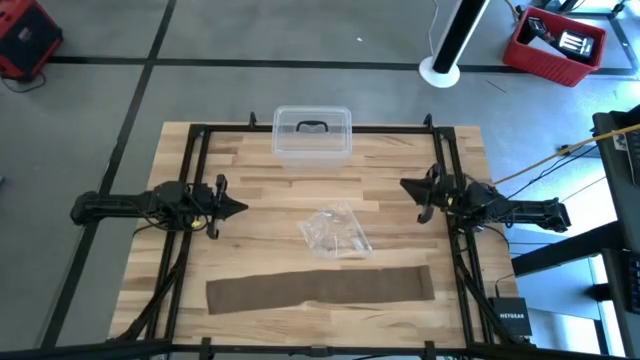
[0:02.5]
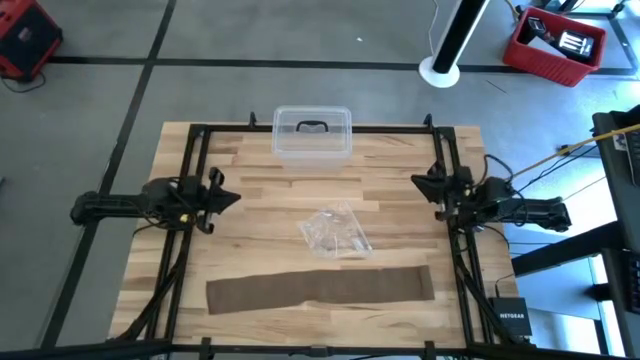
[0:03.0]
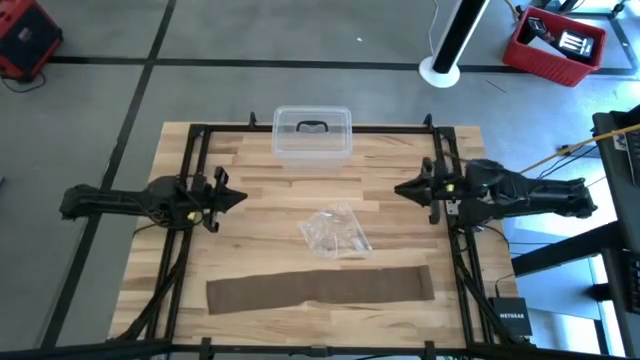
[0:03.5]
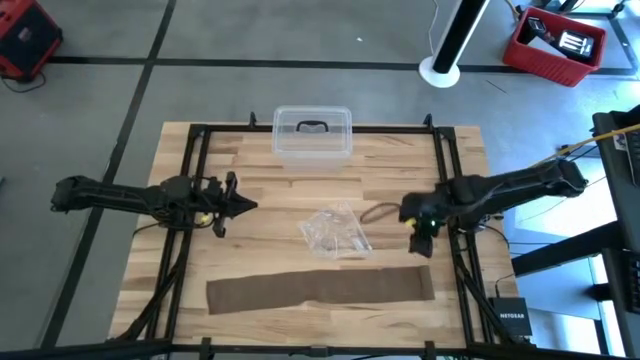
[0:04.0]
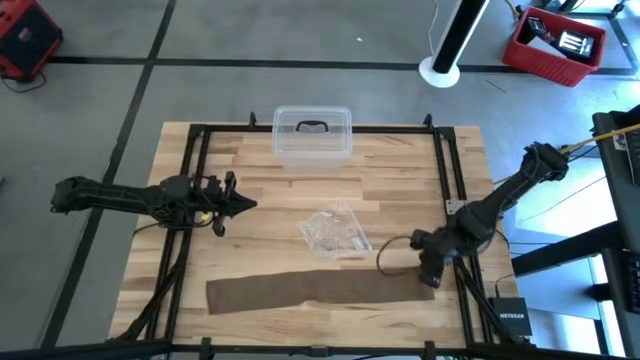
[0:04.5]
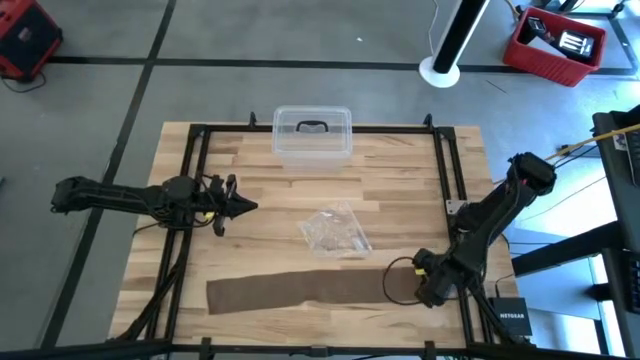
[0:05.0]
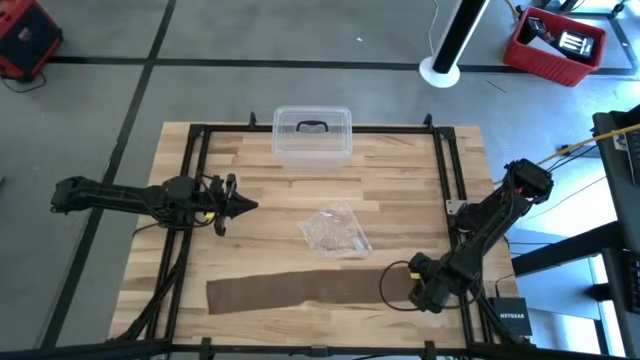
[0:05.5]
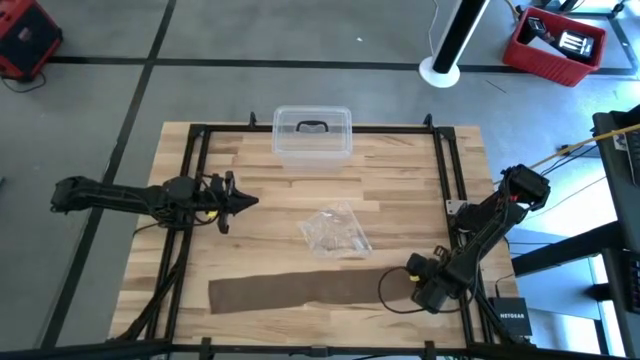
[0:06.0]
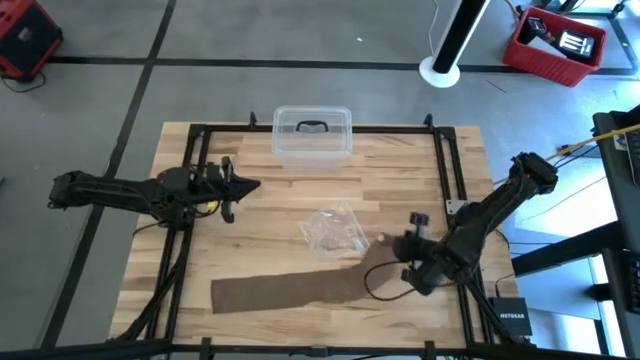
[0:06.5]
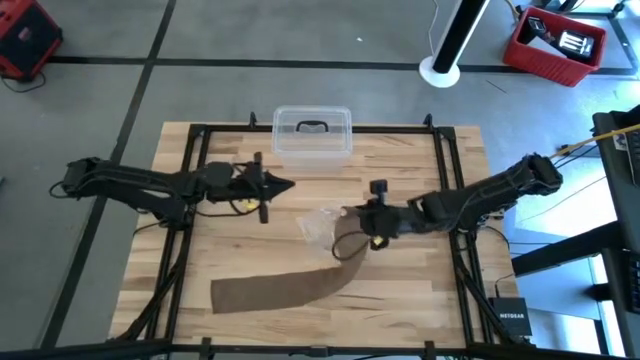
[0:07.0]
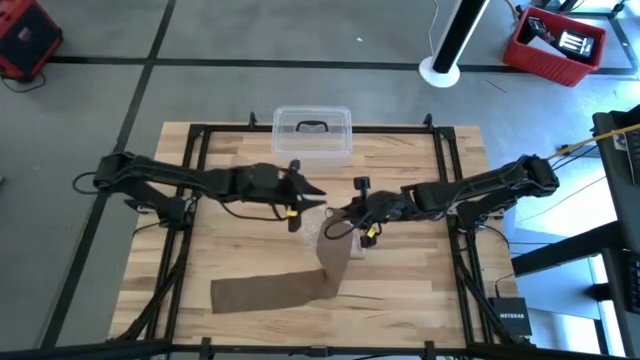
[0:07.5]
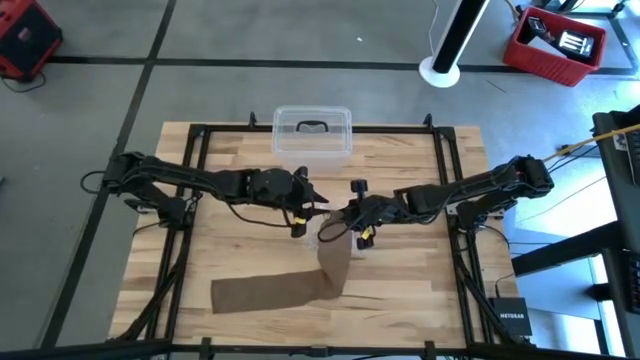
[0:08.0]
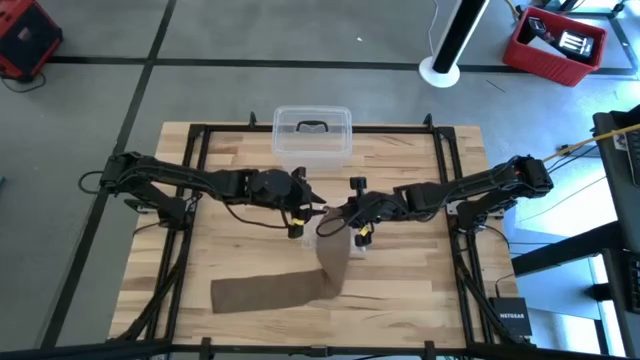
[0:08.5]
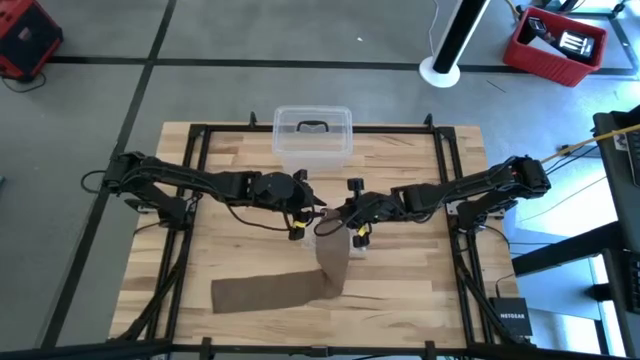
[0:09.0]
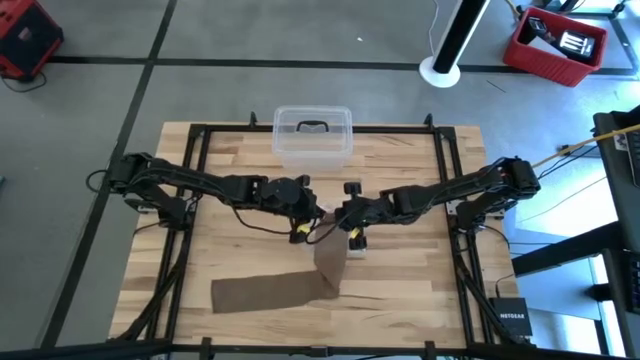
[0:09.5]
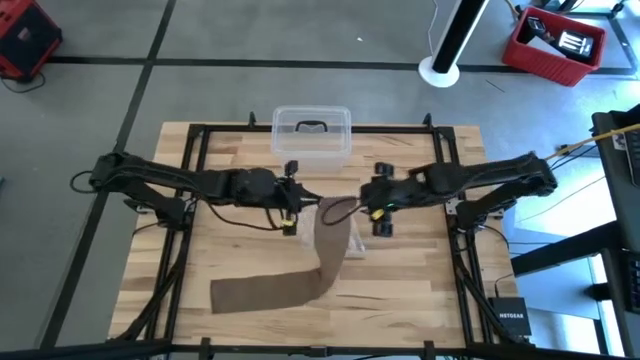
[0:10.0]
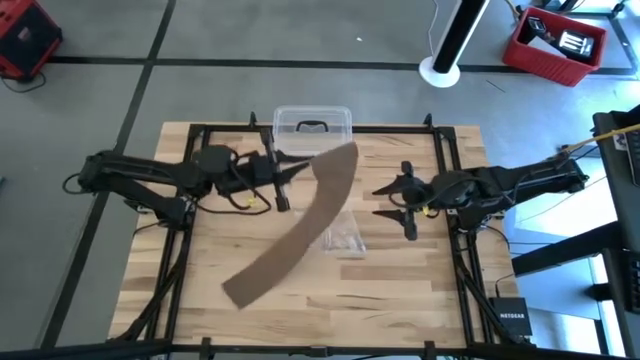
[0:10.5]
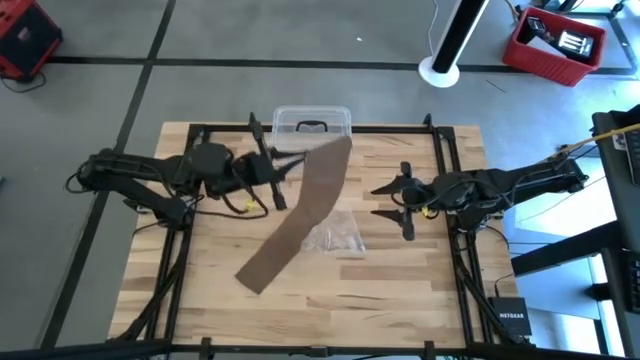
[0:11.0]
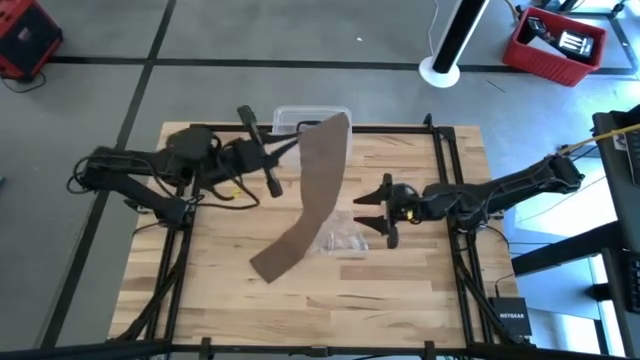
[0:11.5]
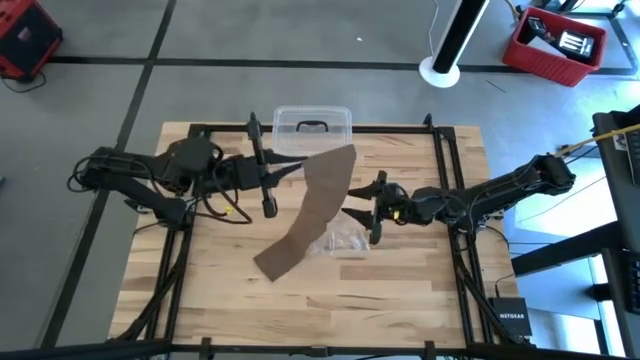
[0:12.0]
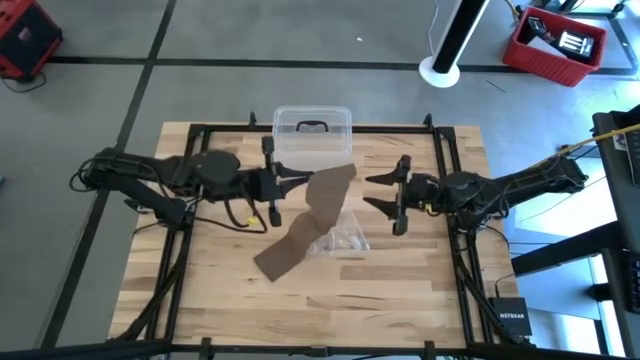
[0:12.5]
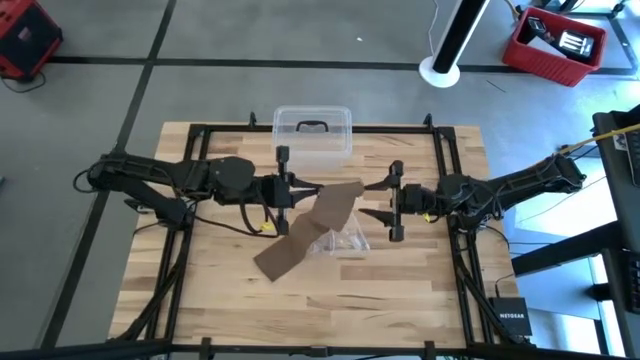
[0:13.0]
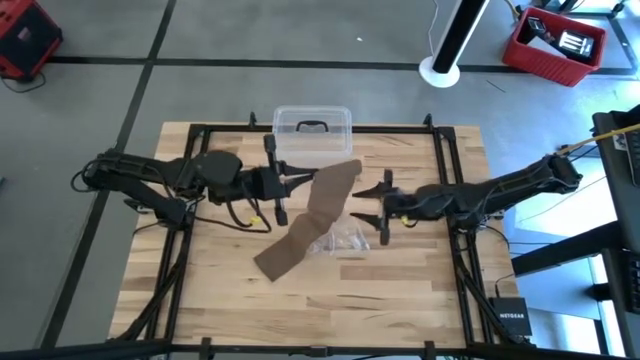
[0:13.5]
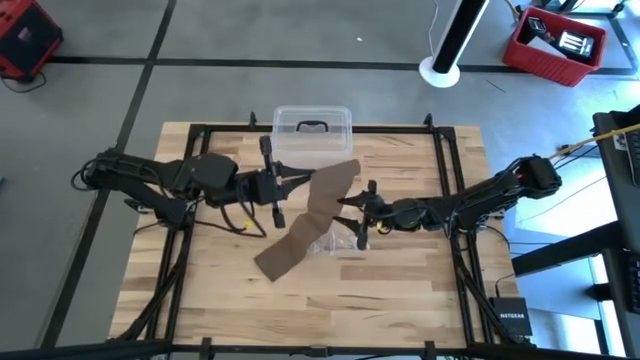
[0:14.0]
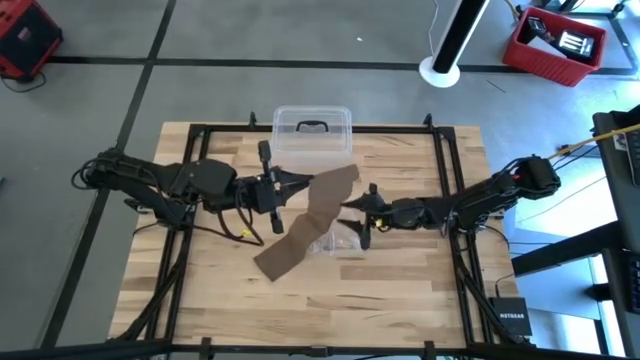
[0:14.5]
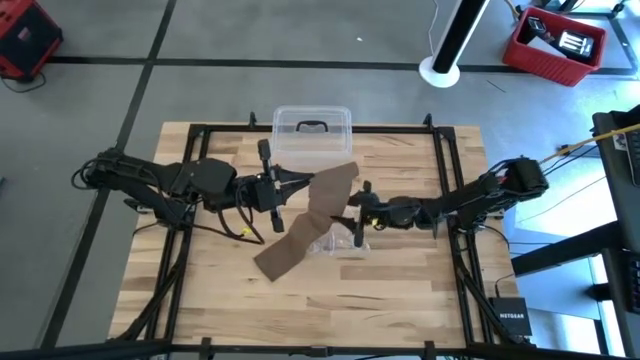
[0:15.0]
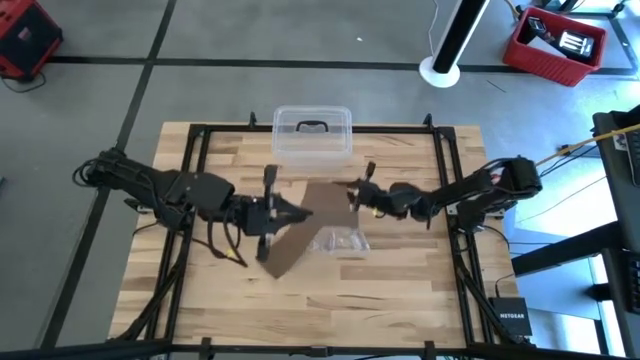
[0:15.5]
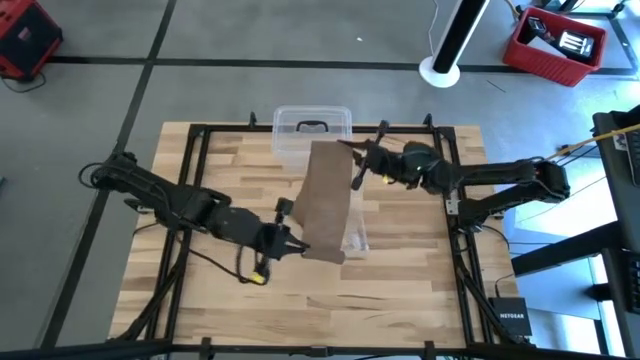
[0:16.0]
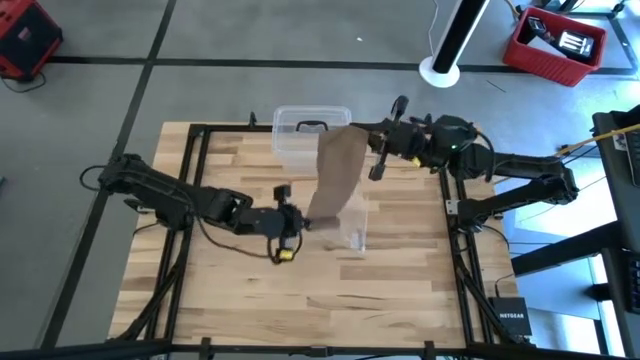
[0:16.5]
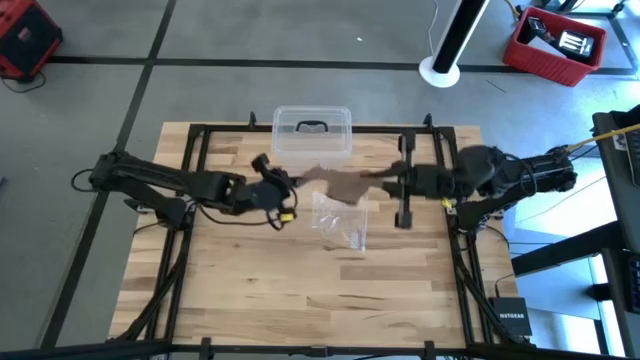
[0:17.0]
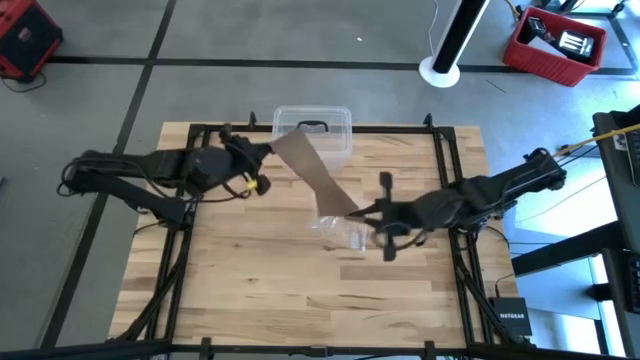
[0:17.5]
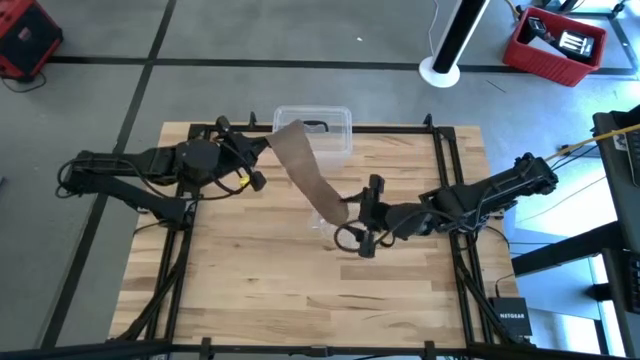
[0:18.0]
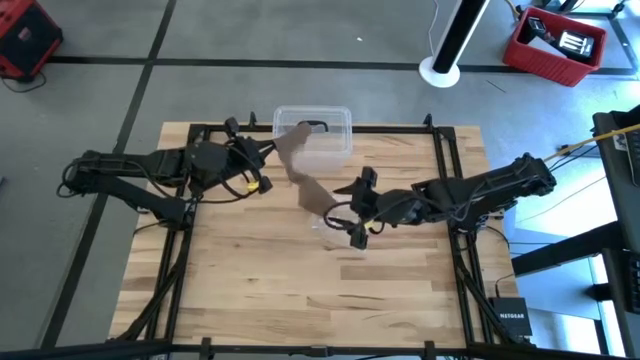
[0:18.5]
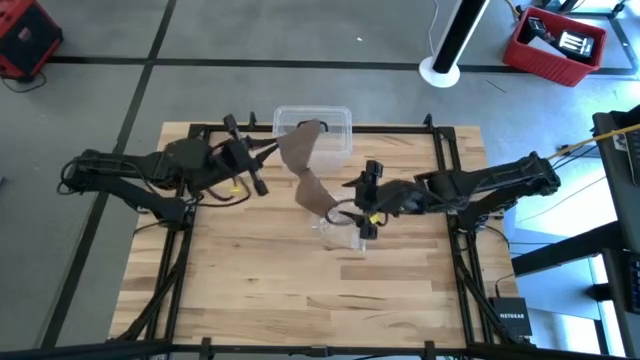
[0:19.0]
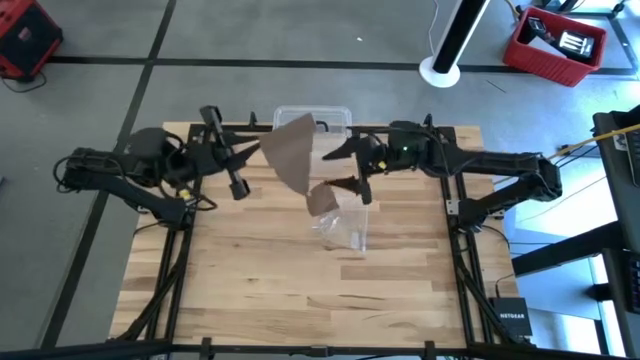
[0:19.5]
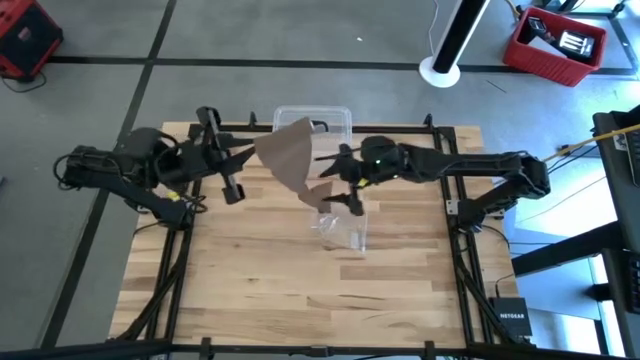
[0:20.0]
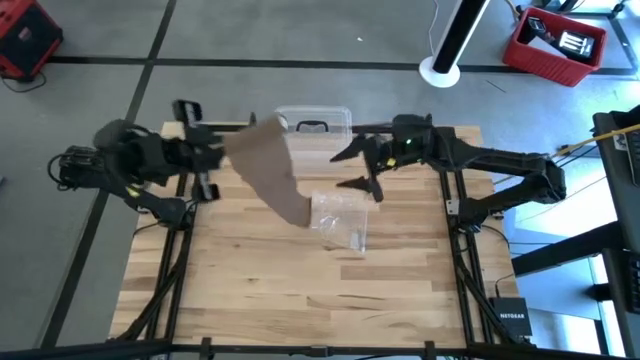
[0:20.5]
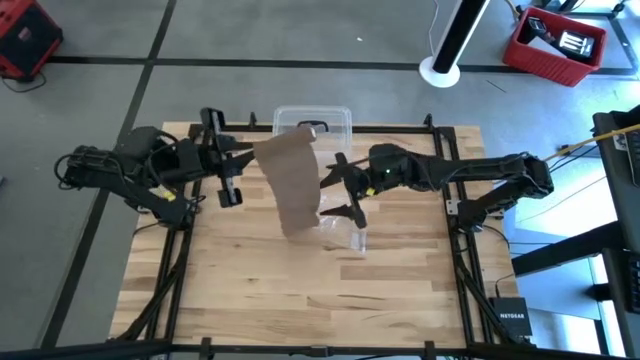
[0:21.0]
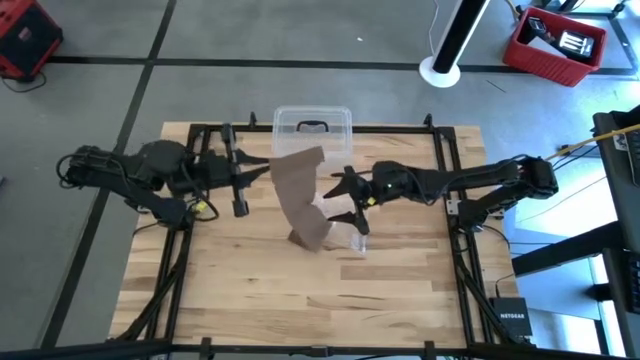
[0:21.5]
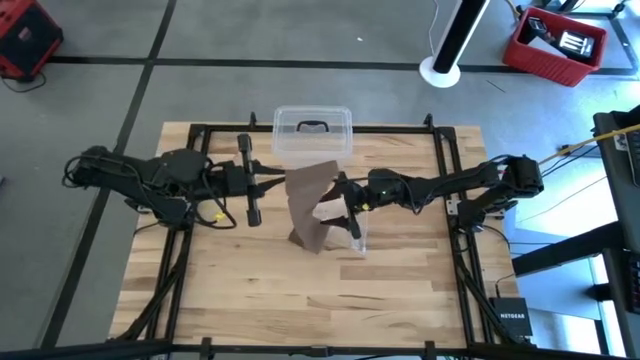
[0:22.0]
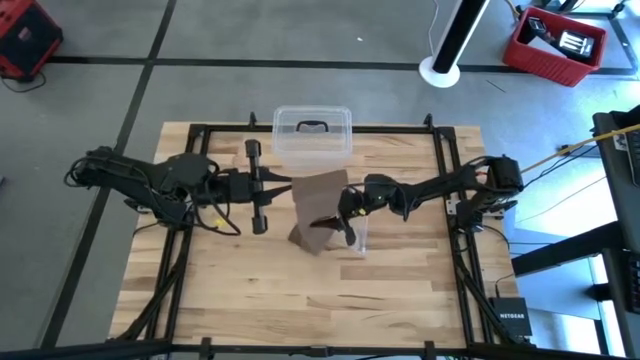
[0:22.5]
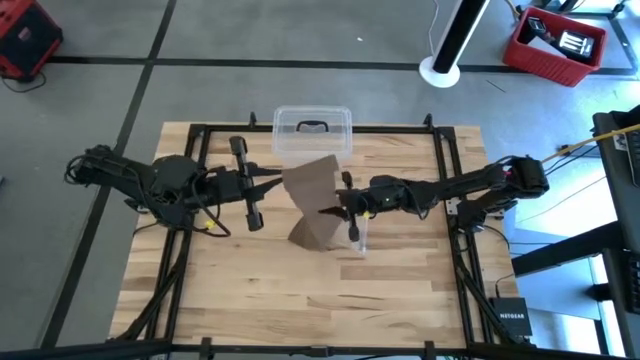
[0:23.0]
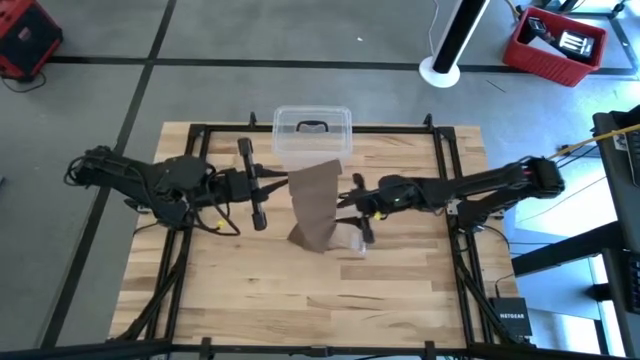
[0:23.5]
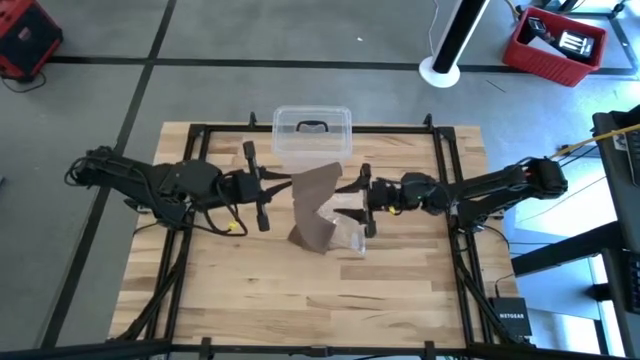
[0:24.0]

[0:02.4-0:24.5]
Task: Roll bandage
Roll the brown bandage
